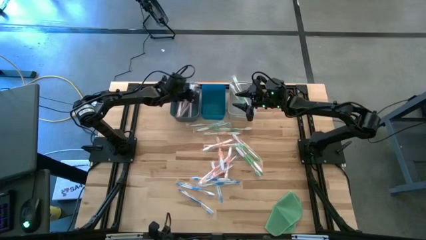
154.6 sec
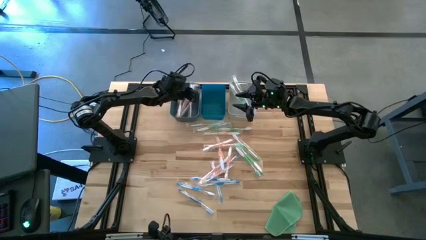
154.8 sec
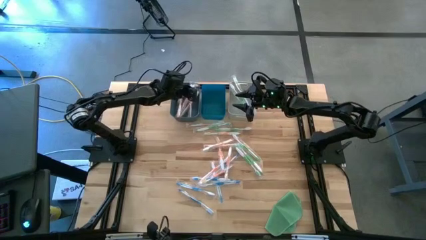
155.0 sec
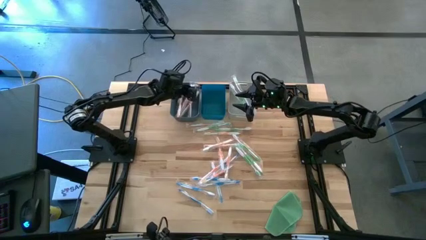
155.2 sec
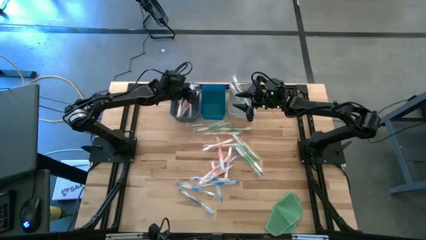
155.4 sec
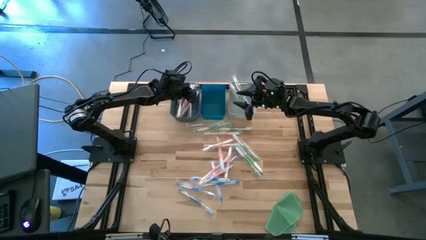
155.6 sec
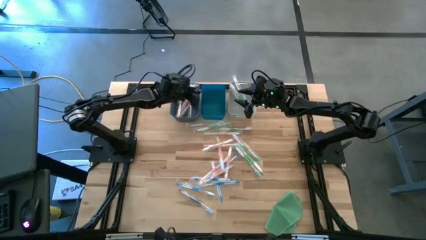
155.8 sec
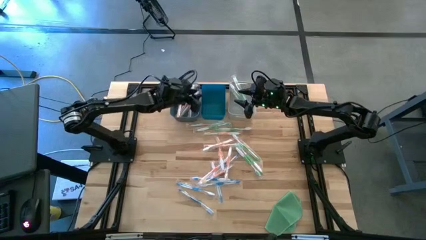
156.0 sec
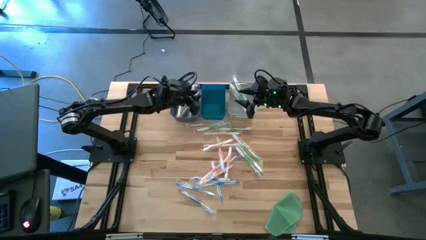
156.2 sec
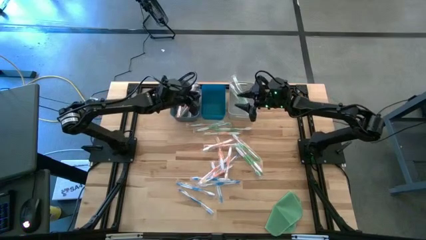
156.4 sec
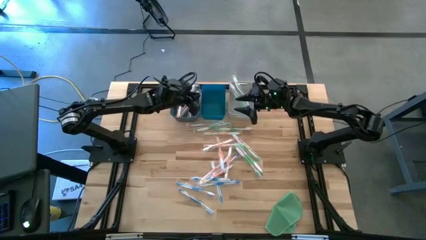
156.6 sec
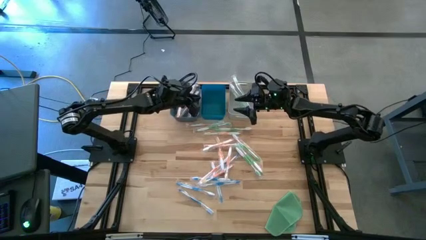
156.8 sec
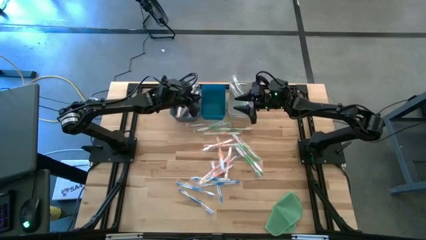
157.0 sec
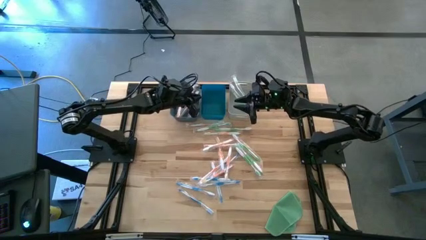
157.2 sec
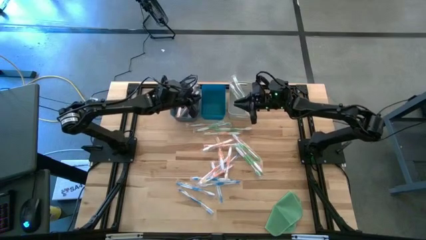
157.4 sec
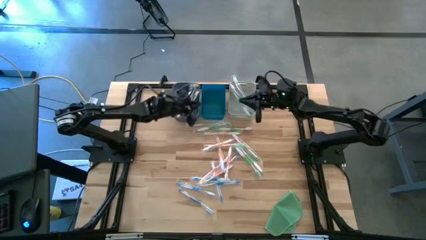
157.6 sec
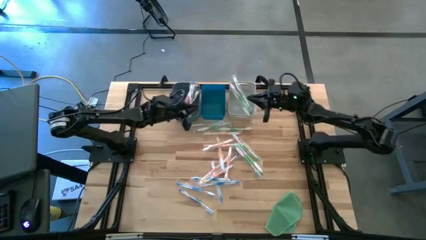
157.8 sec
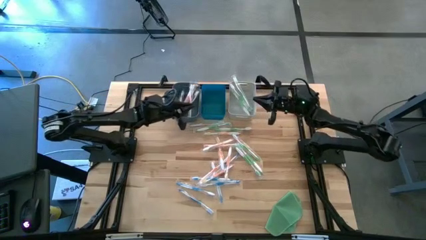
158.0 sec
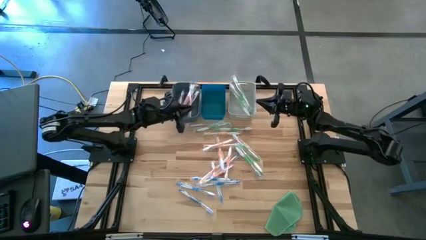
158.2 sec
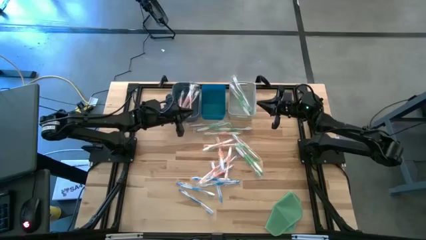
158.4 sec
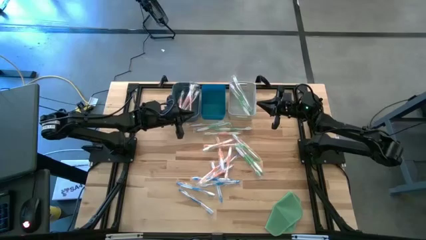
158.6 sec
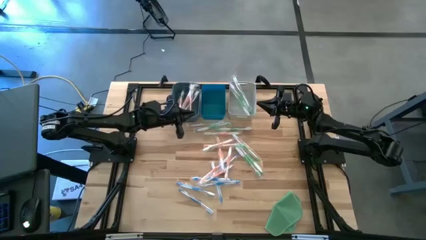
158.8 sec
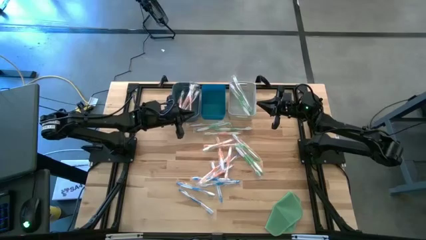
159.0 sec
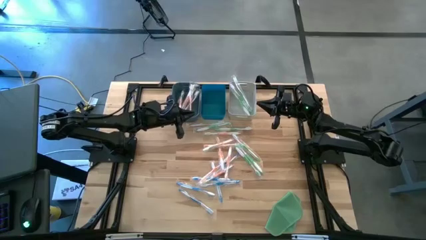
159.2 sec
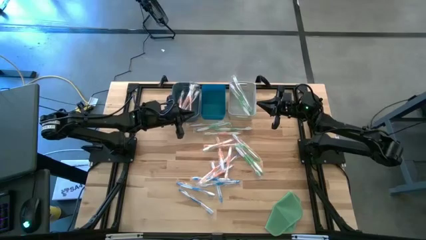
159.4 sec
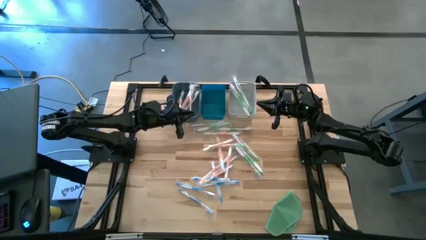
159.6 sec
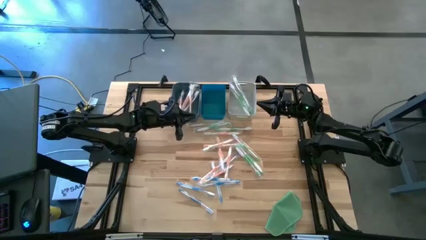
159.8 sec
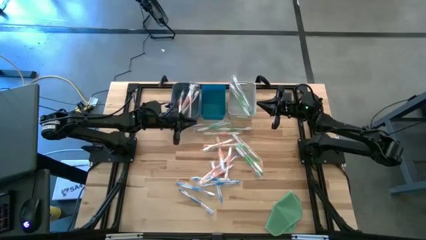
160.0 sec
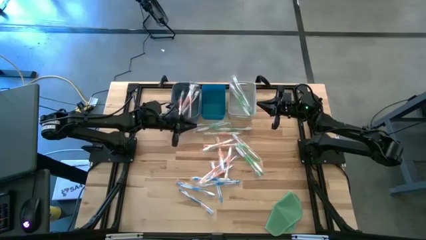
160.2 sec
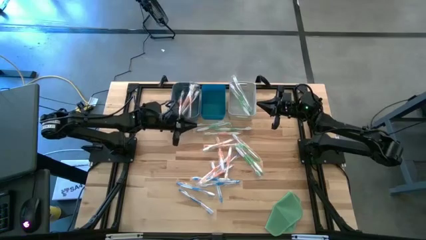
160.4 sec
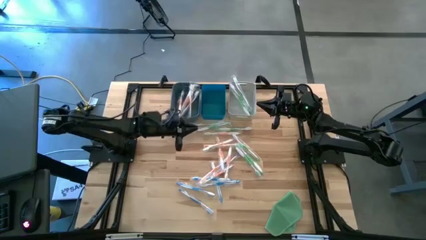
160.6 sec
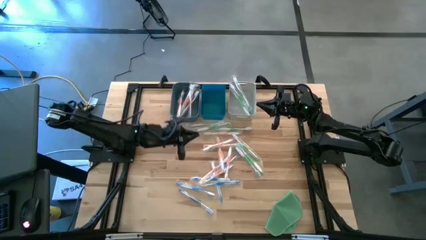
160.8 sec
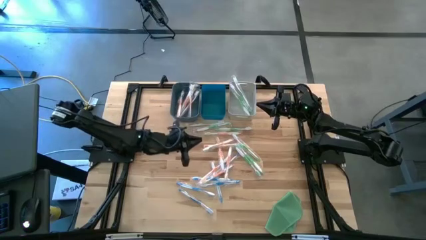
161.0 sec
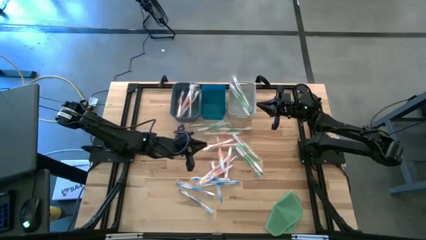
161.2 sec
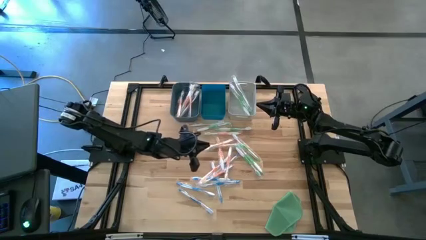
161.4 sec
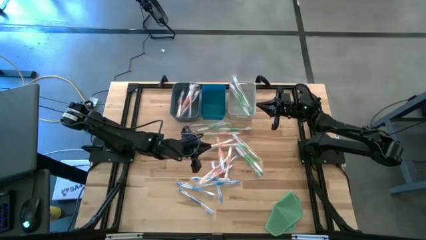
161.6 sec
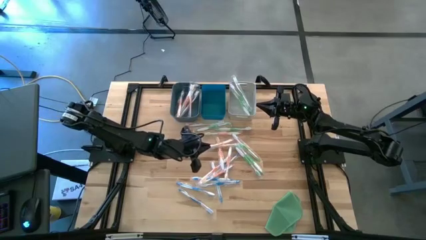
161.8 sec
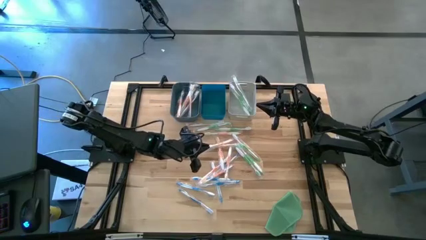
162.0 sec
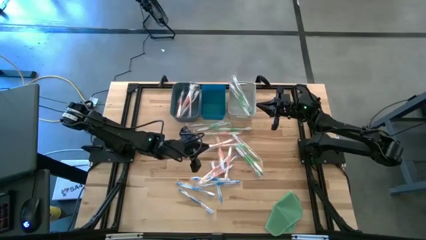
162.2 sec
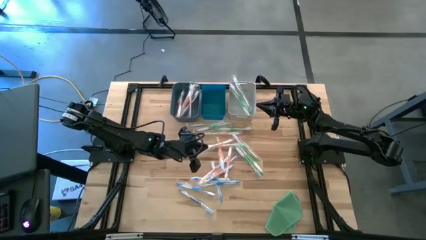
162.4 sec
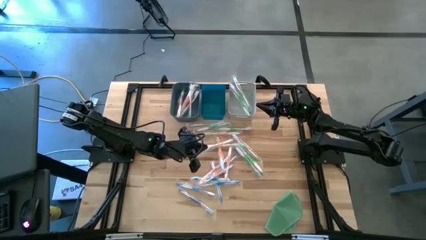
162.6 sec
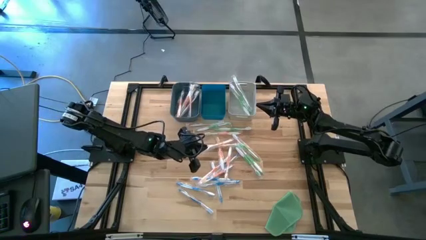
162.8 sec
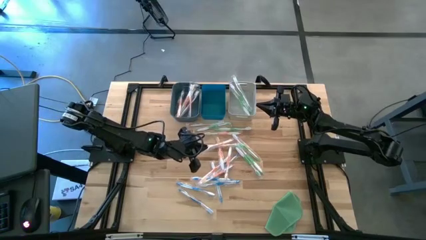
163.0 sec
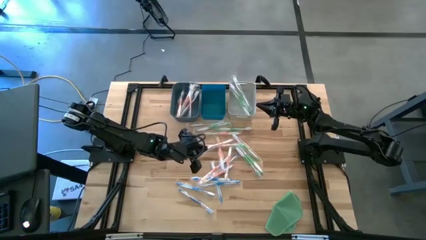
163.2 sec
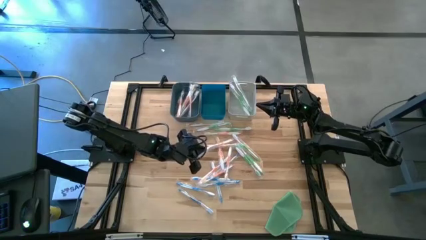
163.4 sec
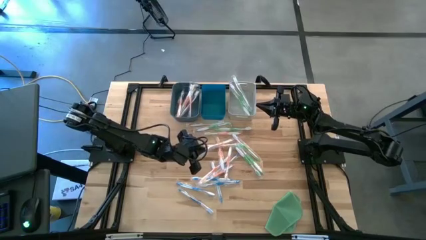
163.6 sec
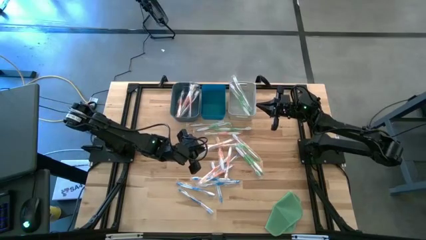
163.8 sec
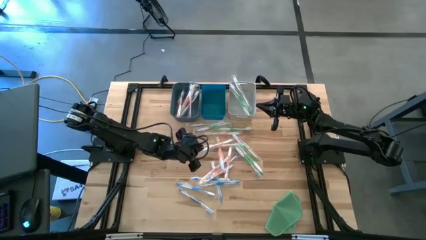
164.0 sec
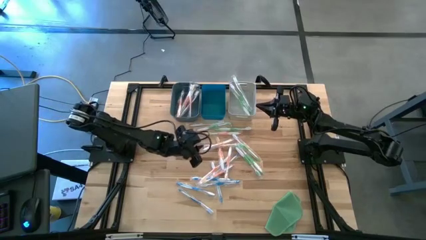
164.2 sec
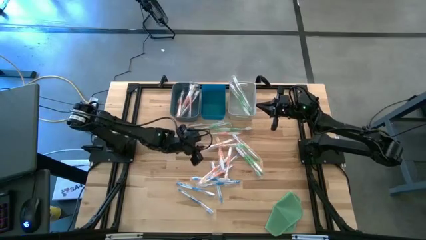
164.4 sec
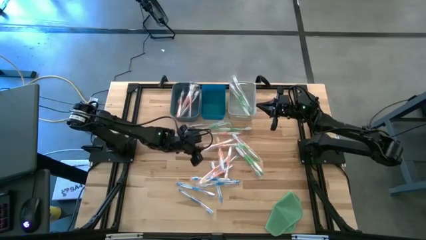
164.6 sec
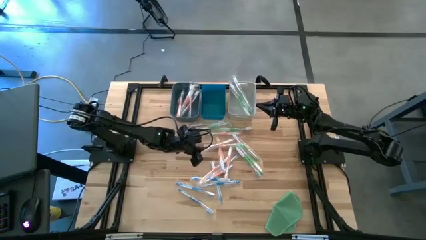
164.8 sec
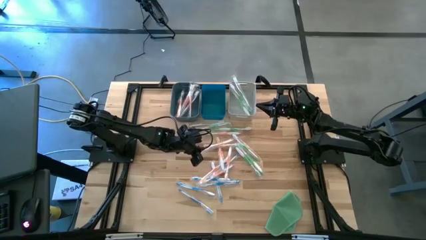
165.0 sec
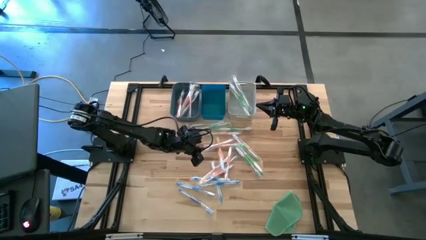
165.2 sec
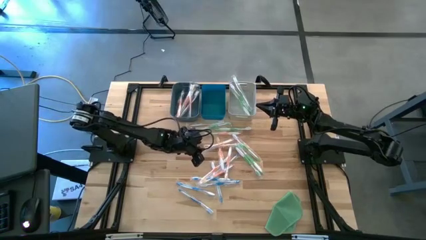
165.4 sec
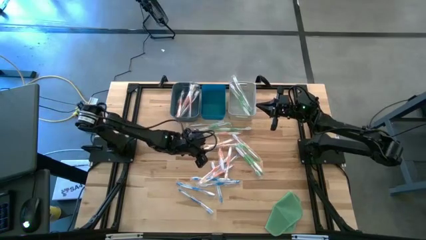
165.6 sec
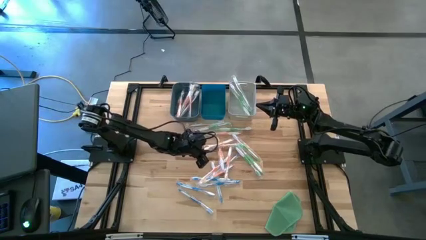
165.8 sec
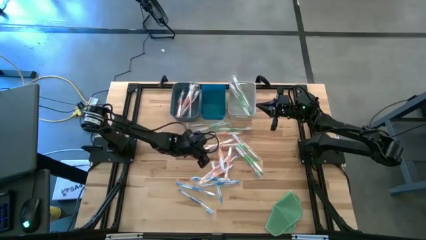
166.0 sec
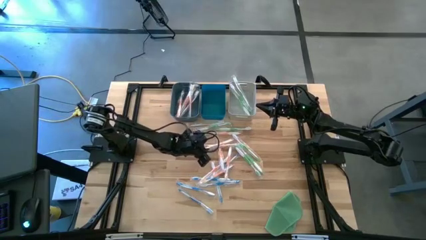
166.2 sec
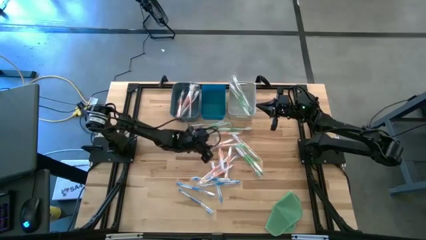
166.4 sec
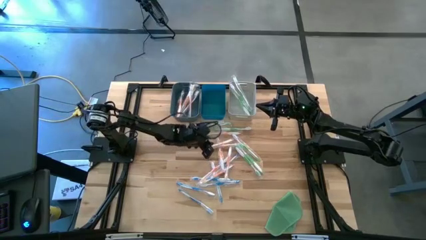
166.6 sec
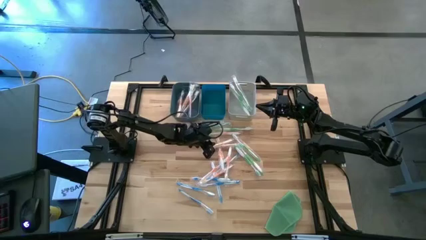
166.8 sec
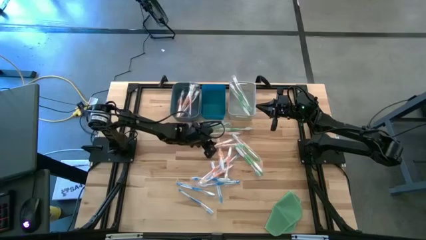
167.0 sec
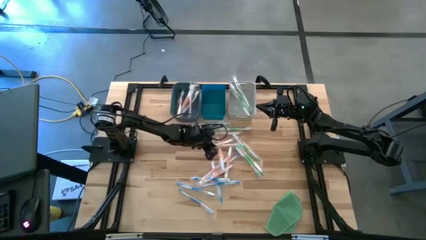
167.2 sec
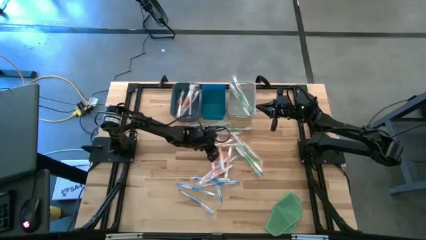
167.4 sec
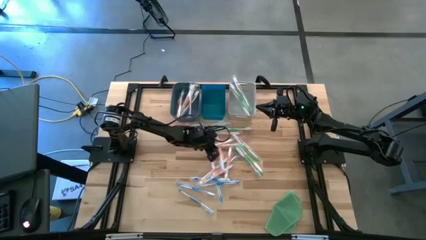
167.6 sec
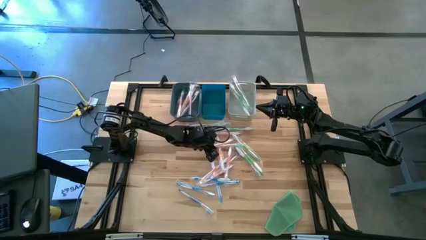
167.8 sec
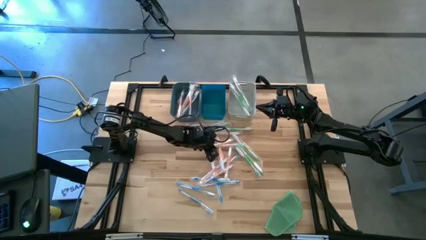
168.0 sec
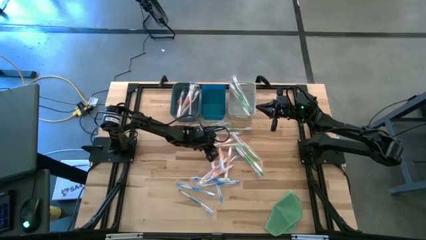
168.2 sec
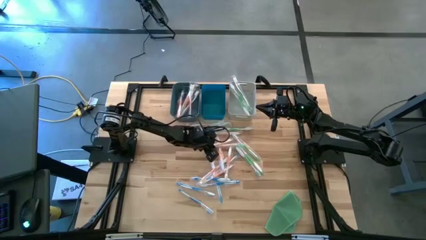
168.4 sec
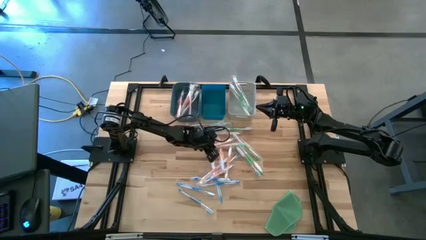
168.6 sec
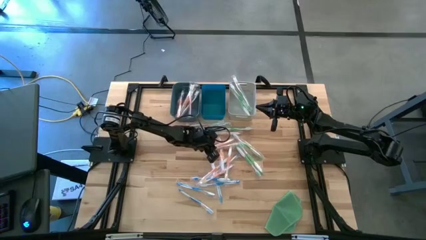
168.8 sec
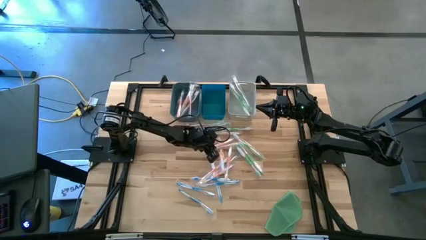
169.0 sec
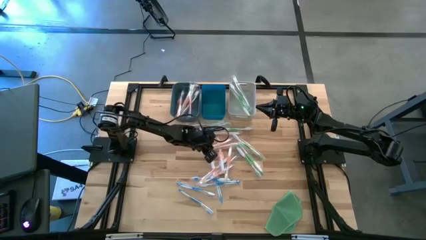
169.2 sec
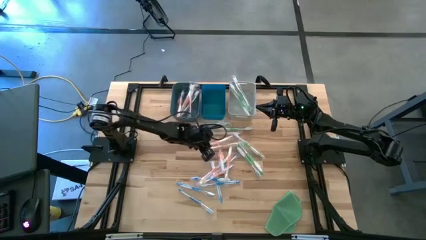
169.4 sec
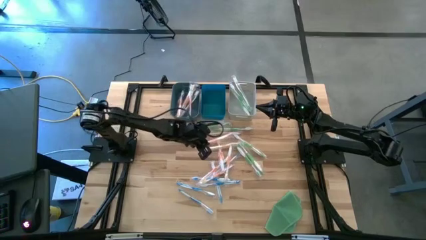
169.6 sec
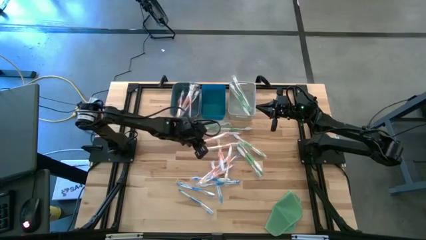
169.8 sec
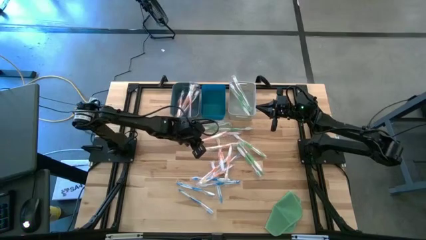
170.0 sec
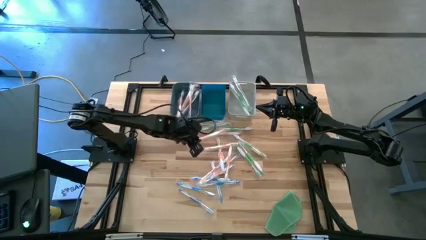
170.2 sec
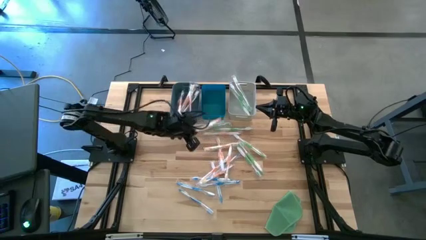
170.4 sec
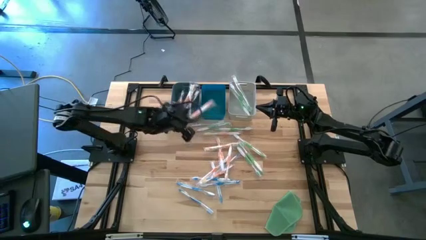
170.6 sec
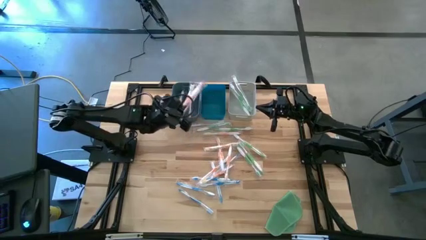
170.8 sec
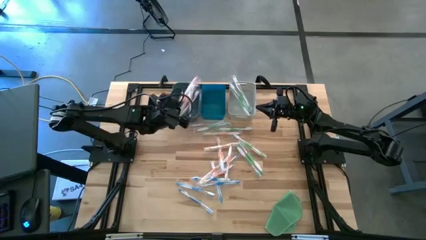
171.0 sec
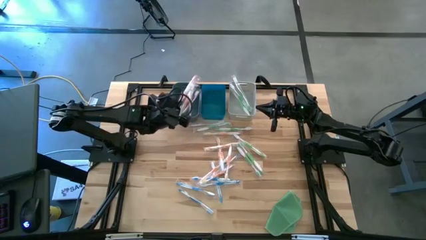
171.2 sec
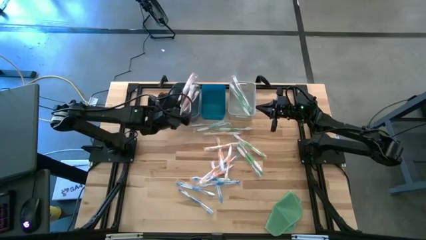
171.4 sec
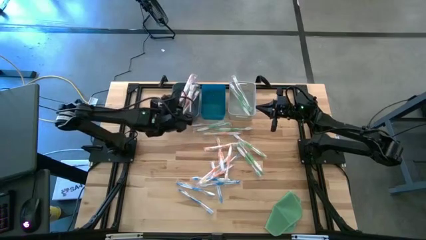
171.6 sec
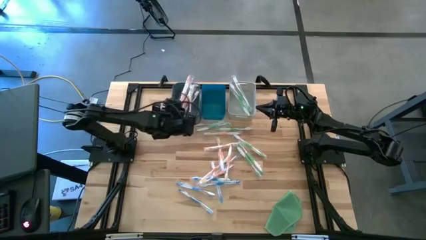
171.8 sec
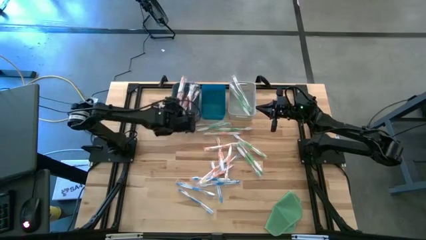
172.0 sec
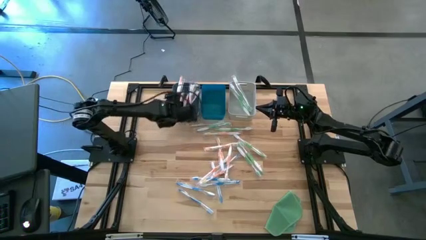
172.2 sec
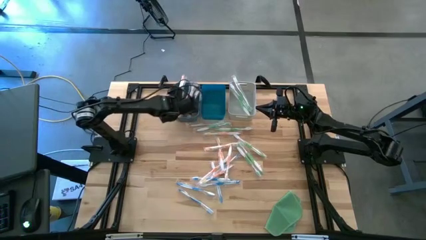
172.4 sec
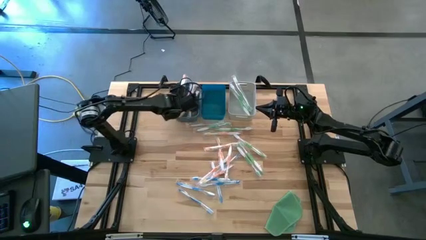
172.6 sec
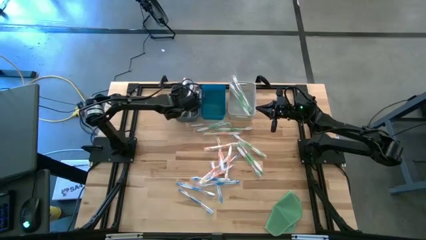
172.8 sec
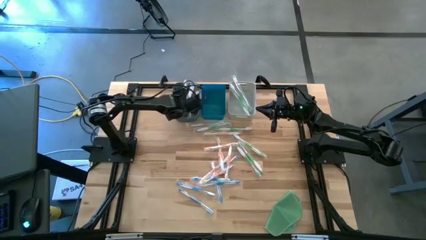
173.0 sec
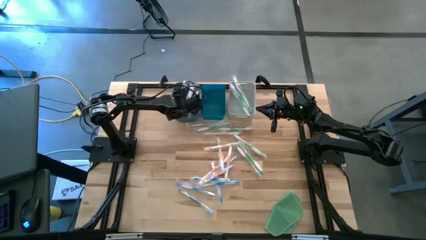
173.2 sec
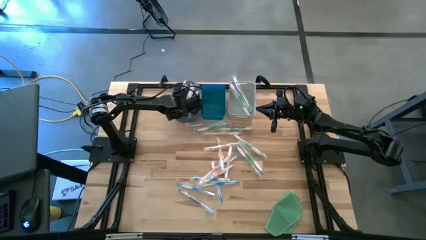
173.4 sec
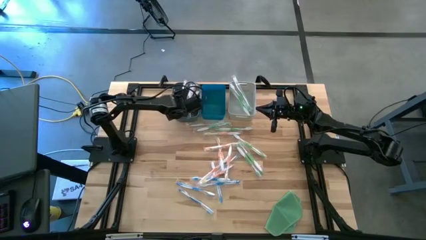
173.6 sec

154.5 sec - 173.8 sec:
Task: Pick & Place Toothbrushes
Put the orange toothbrush into the dark blue bin
